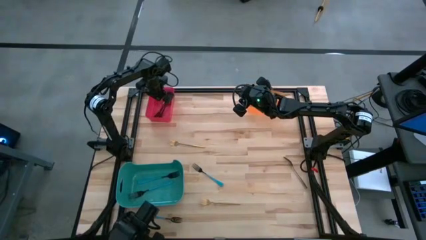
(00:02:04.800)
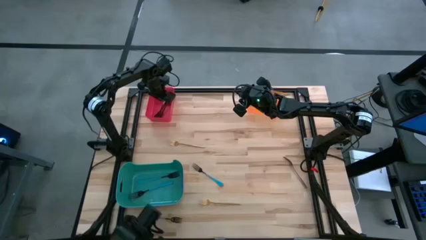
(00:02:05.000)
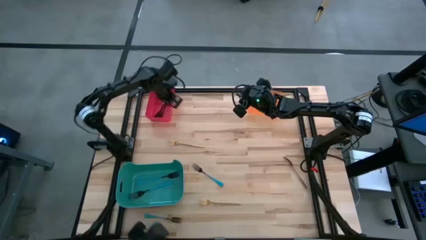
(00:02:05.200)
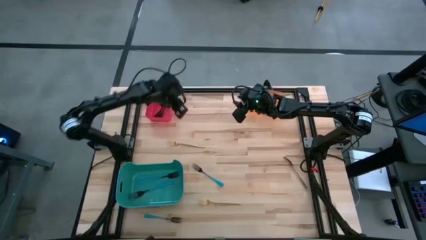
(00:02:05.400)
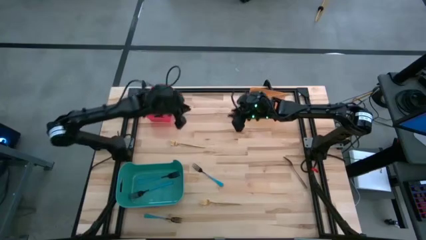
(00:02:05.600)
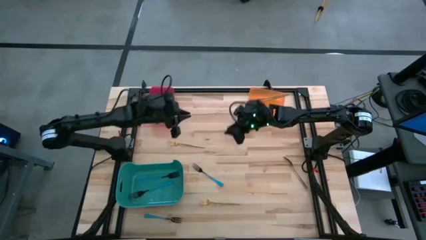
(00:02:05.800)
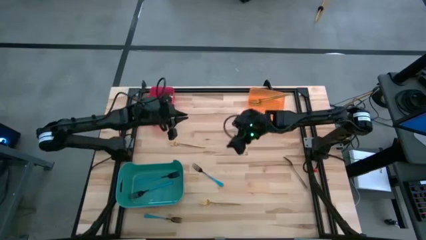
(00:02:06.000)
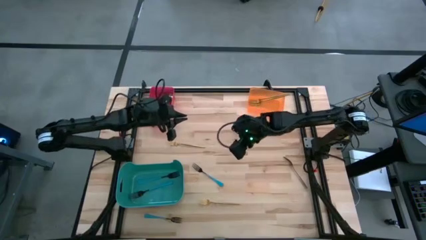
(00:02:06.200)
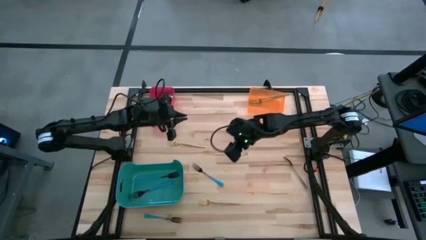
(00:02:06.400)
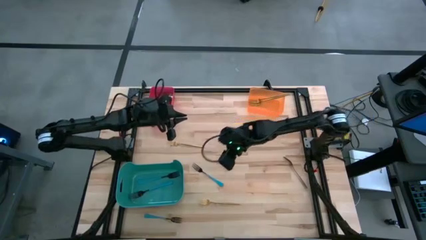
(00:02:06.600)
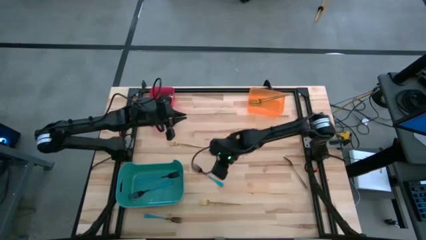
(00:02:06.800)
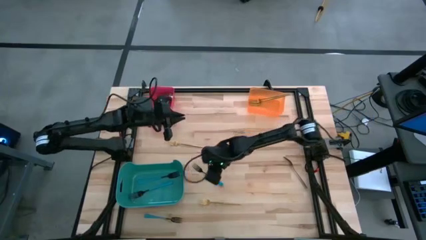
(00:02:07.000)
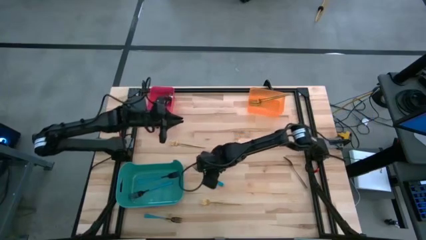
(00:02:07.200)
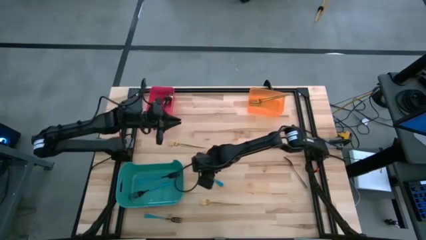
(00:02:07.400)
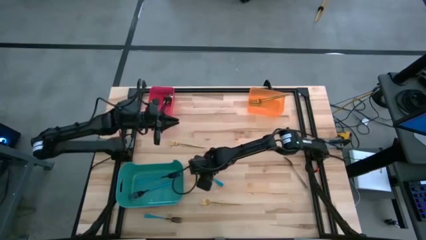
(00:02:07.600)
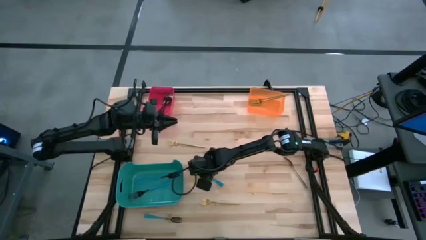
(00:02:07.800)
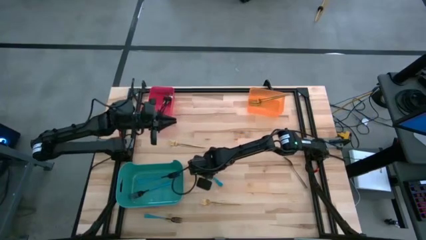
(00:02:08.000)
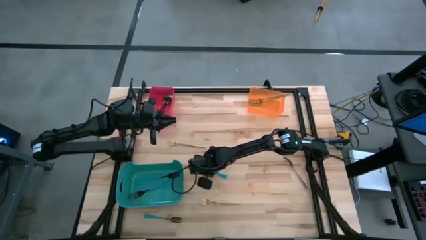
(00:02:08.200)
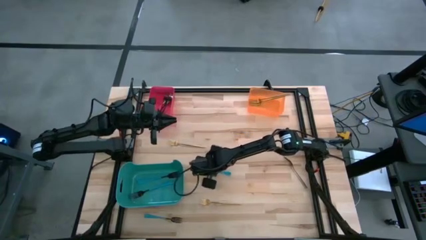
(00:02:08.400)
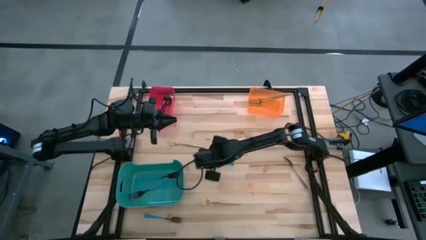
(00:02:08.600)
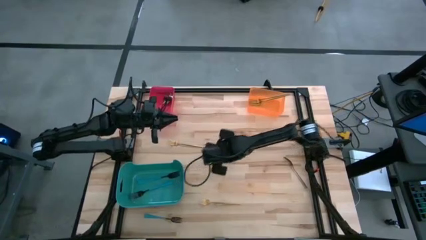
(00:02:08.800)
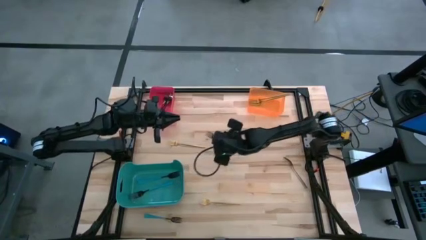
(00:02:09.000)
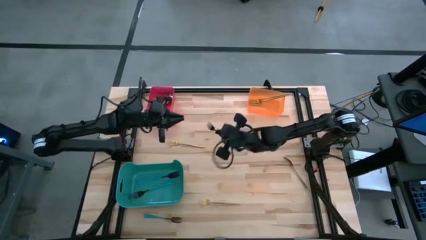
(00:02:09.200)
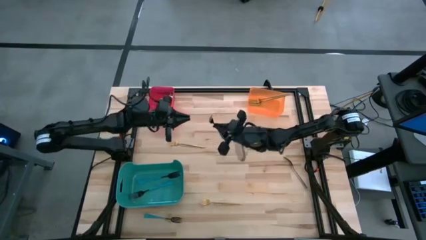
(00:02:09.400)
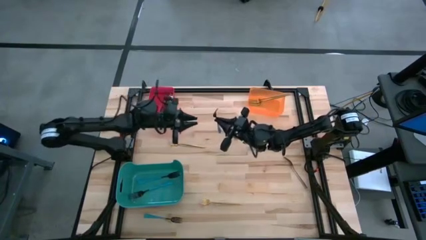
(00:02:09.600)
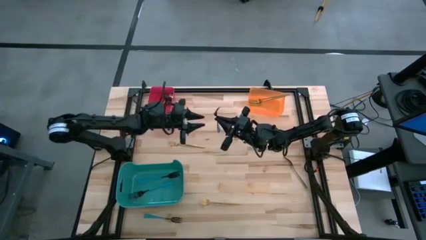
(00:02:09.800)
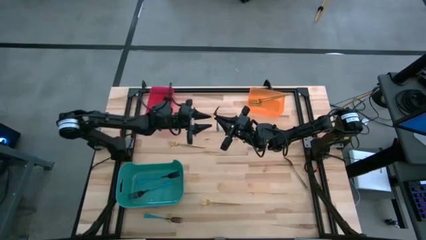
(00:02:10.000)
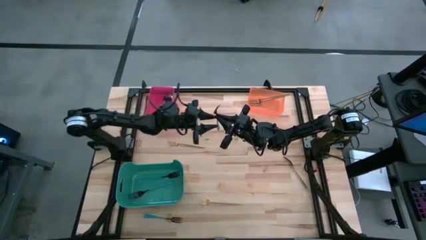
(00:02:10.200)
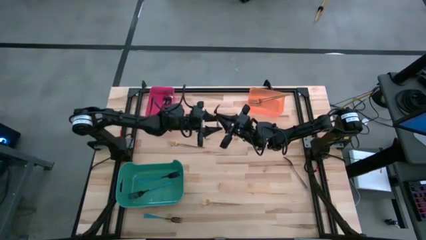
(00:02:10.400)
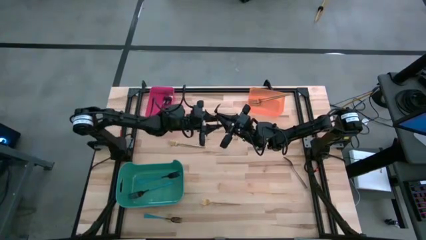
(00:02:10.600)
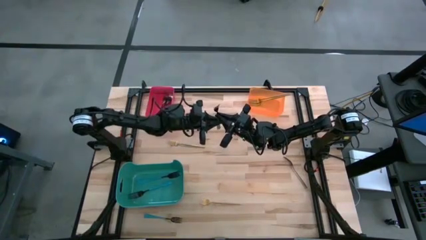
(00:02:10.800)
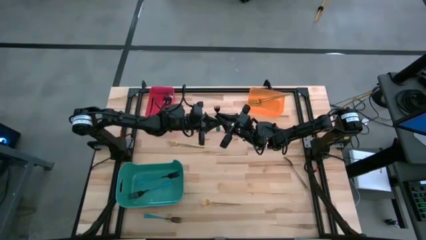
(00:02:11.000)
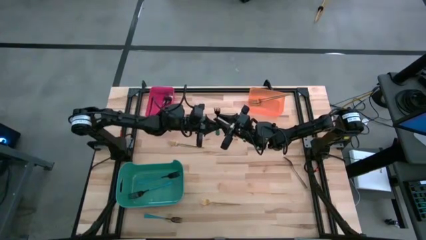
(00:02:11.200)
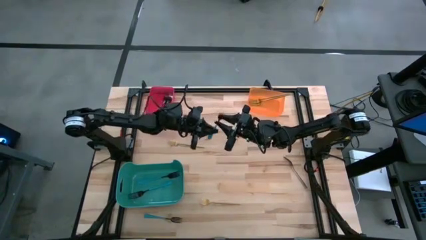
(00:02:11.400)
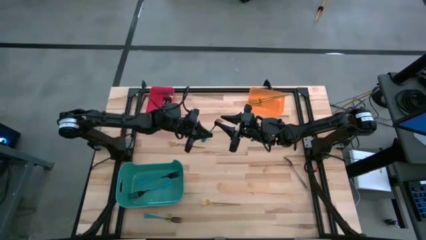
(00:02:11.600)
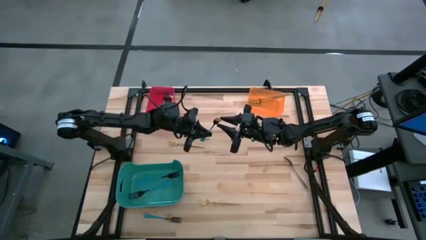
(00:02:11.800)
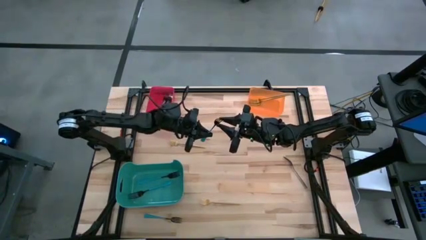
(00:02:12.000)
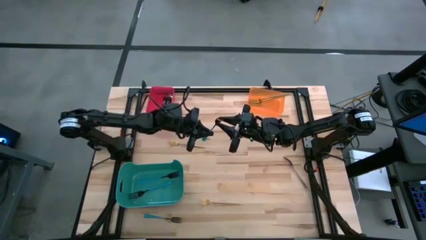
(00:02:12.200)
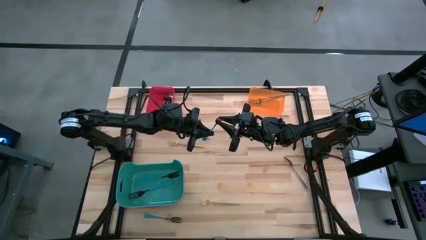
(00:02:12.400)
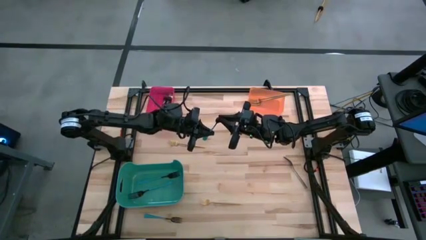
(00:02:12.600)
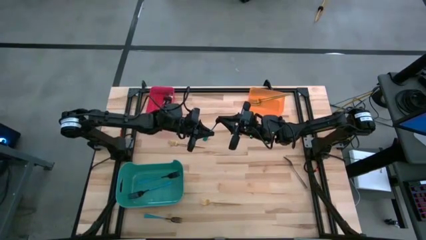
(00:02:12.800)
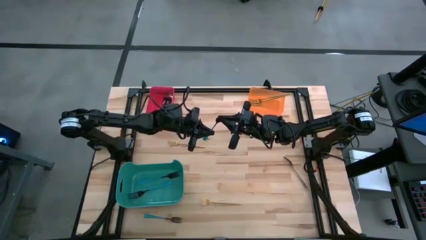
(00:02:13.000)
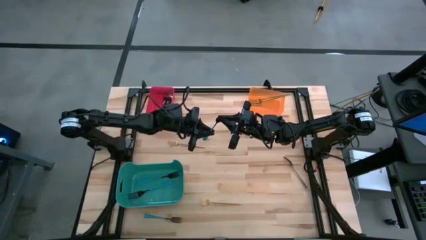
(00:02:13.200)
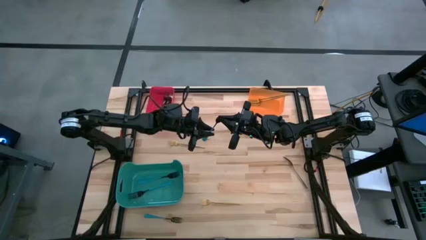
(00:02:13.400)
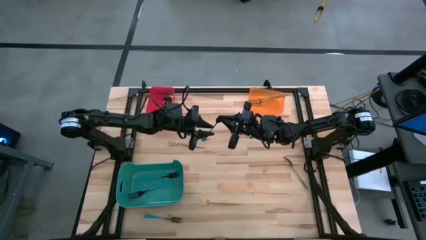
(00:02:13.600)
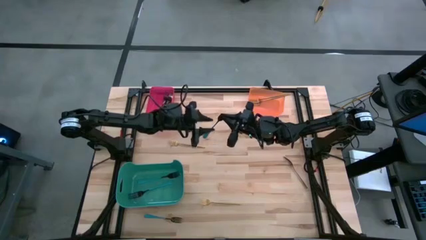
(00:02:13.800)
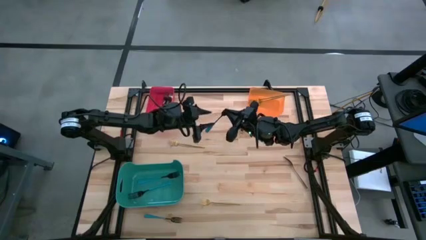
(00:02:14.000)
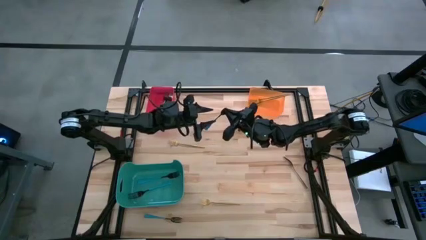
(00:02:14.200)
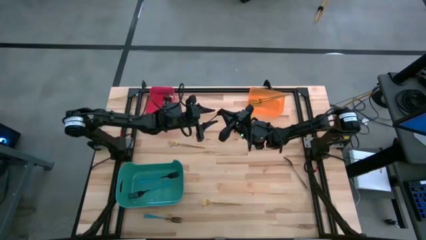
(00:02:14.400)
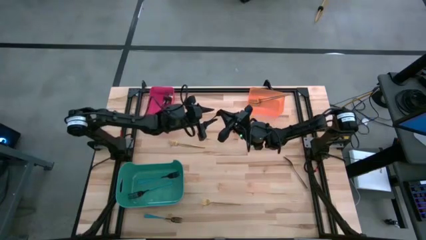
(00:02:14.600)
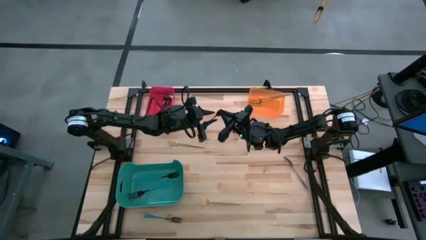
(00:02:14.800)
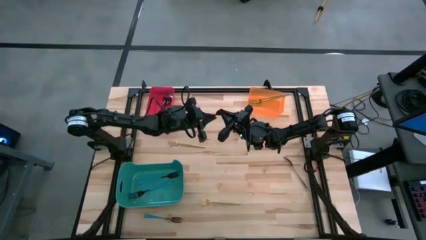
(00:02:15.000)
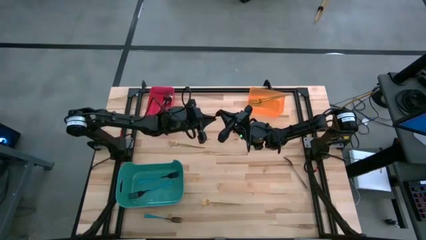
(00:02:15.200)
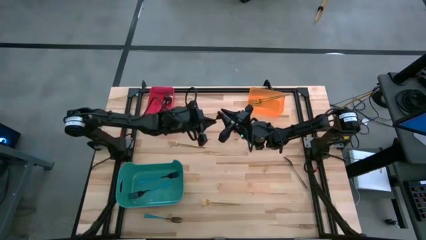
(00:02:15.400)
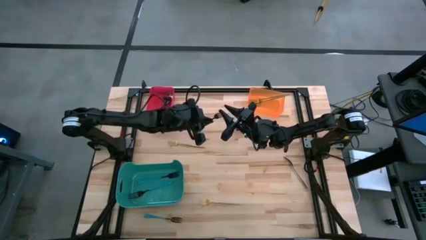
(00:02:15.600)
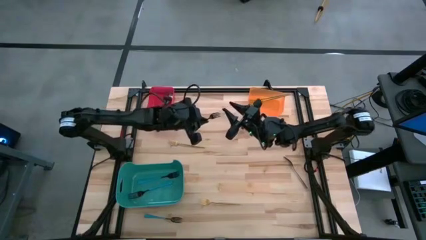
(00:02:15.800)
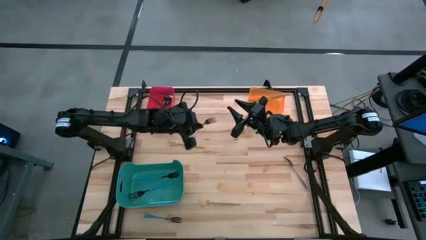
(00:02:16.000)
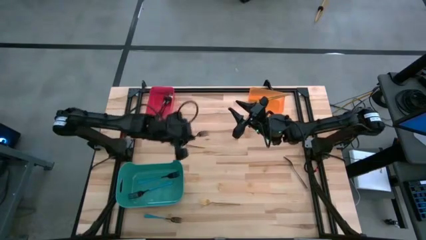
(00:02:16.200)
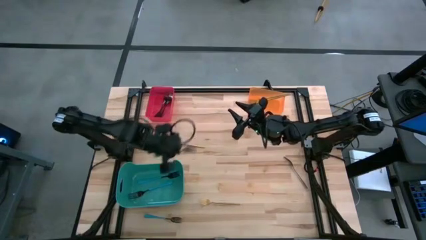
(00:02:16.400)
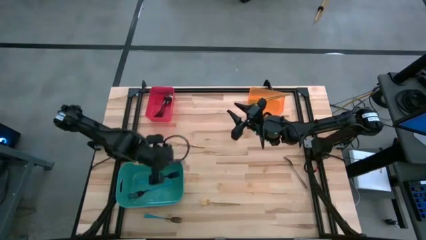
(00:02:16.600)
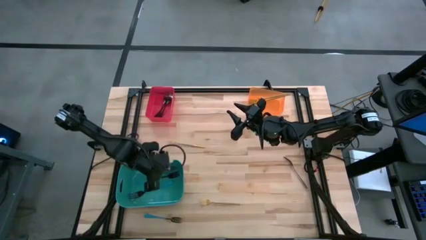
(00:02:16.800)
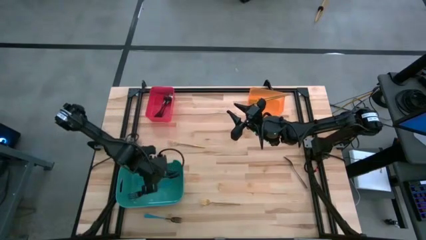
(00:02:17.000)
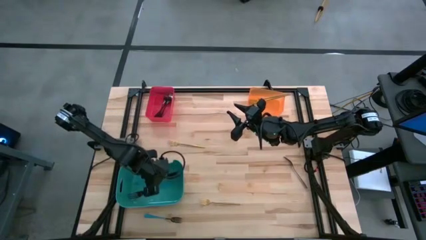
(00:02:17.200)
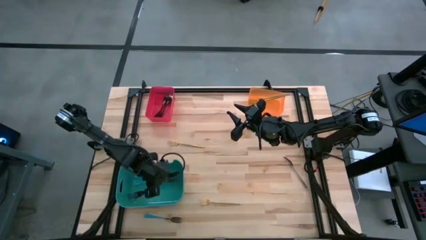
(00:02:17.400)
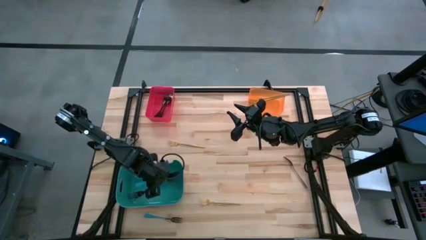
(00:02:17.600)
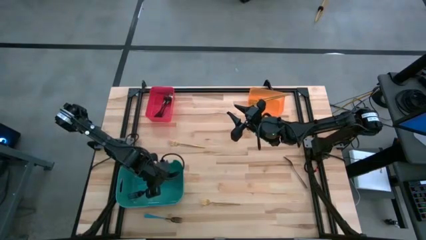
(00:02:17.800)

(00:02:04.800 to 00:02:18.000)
Task: Sort silverware by color (type)
Put the blue fork into the green bin
